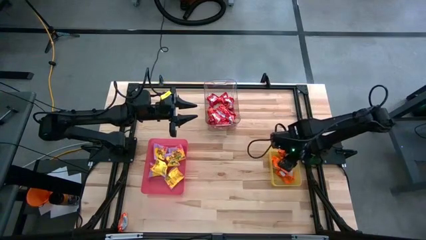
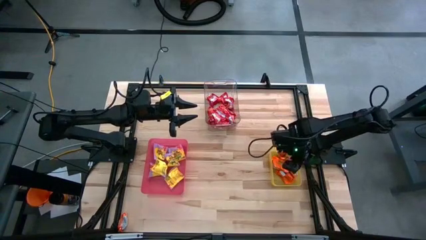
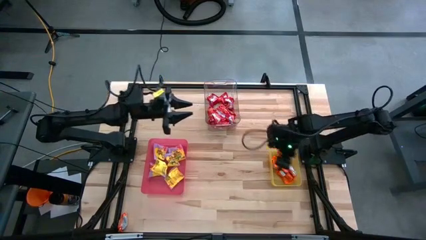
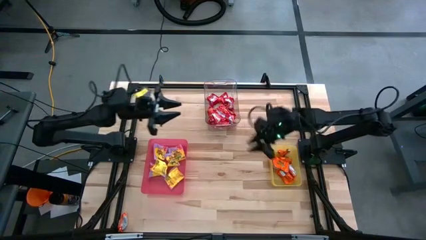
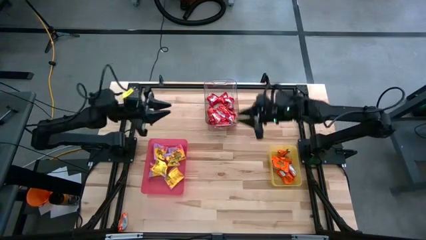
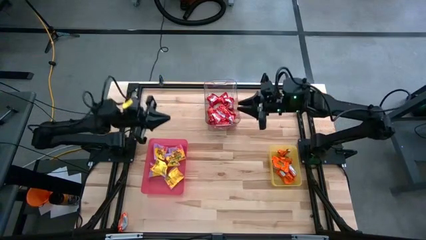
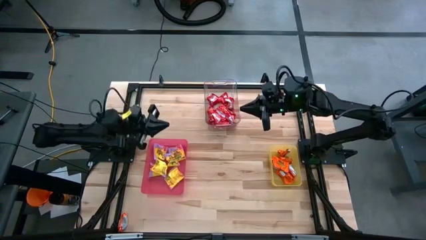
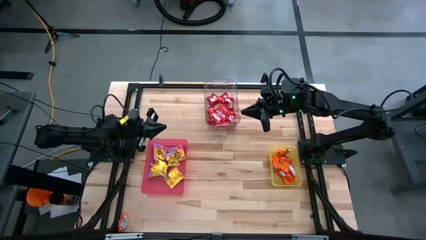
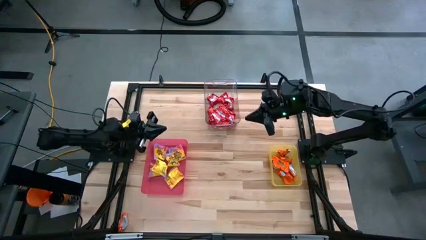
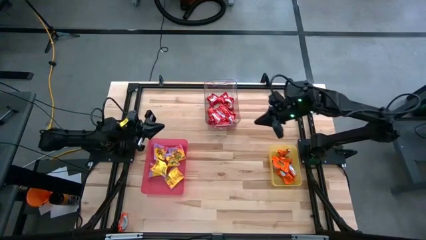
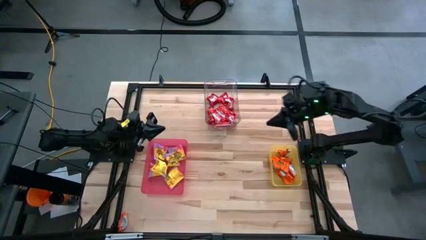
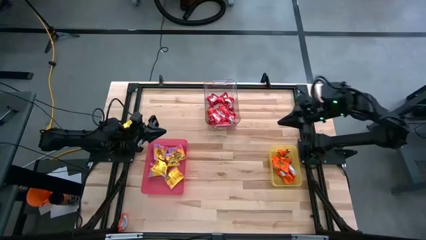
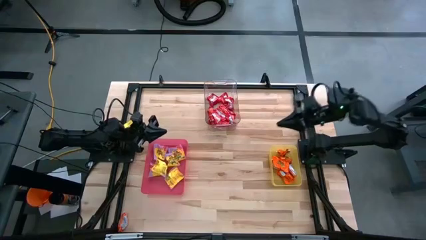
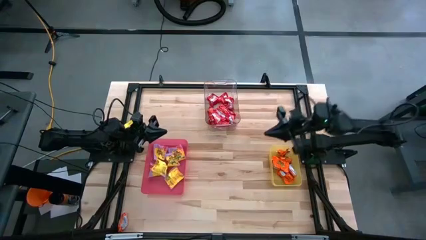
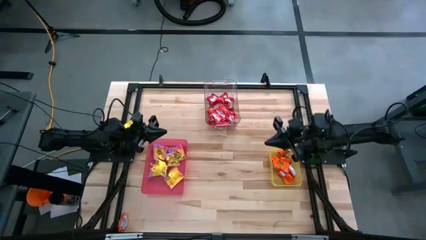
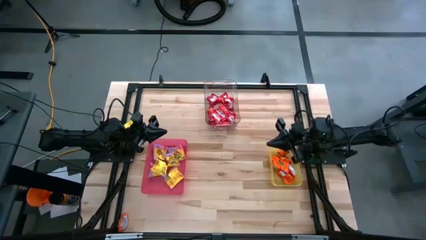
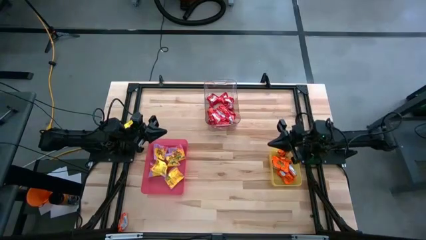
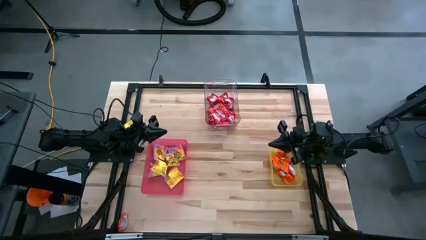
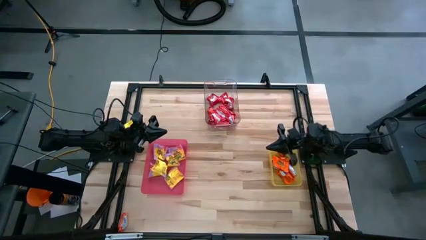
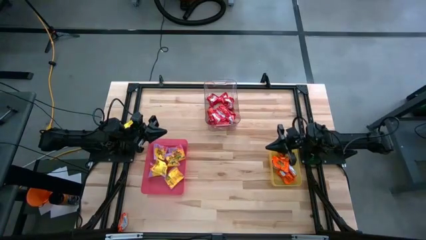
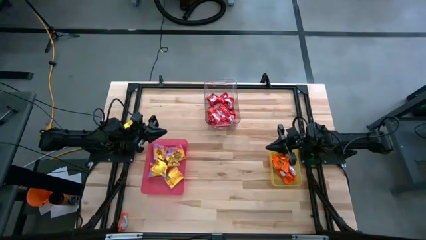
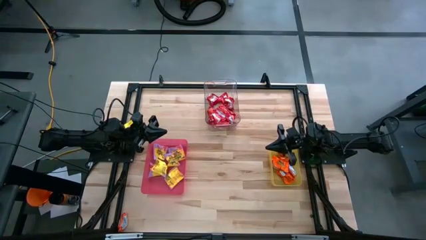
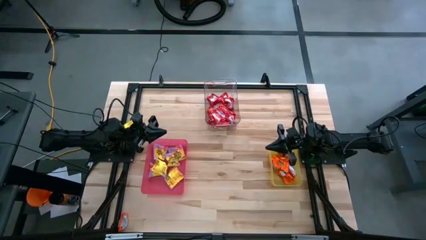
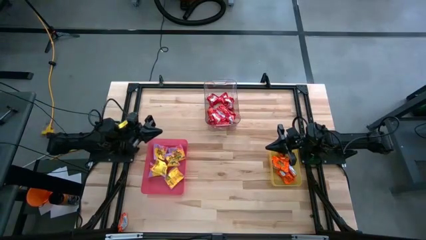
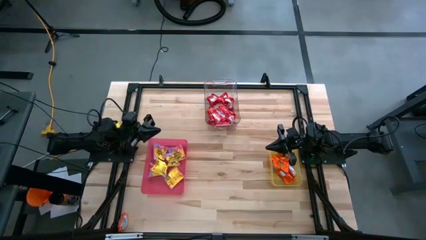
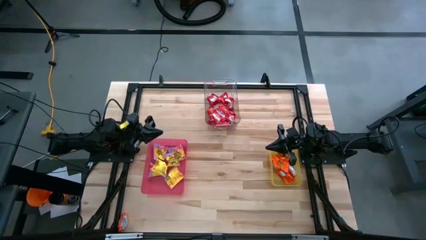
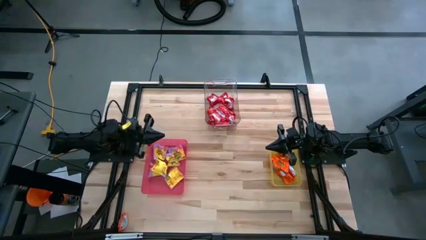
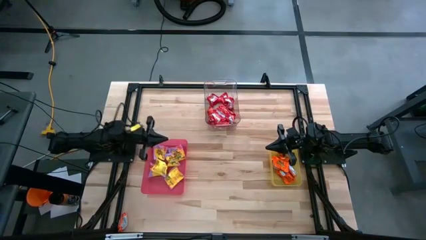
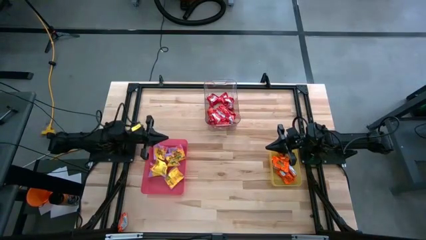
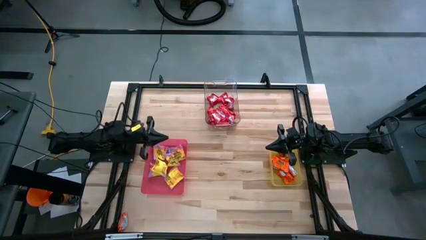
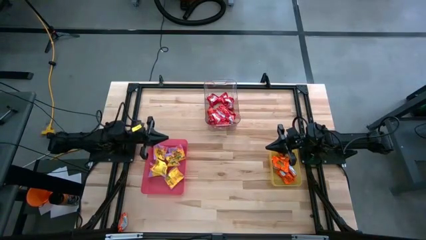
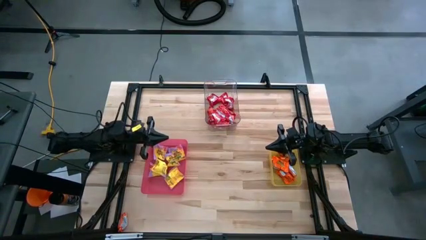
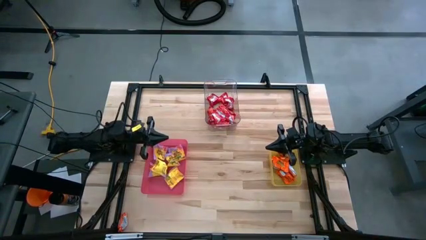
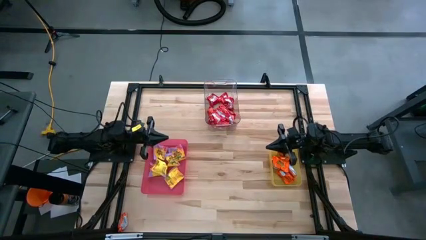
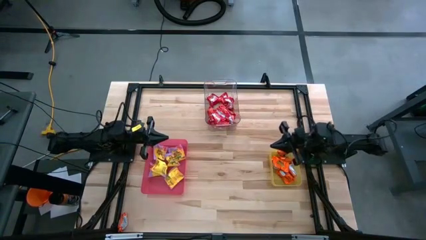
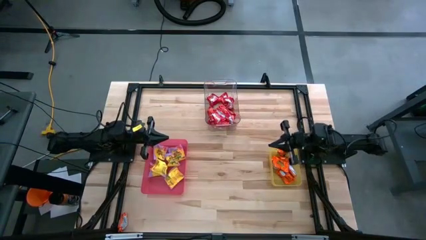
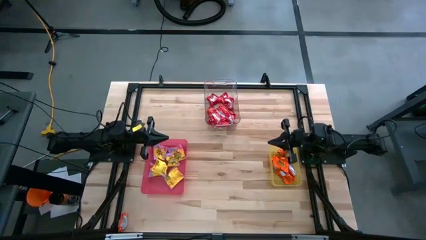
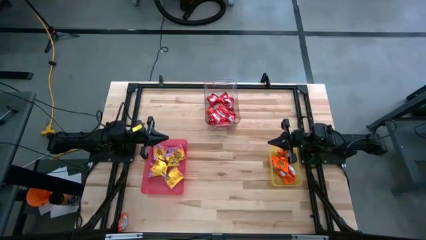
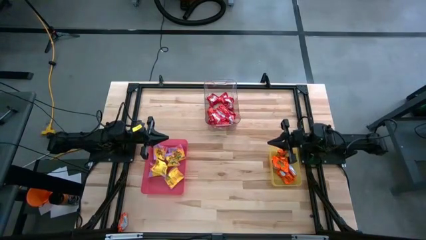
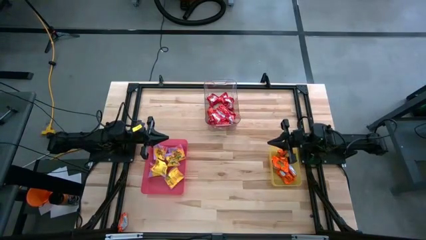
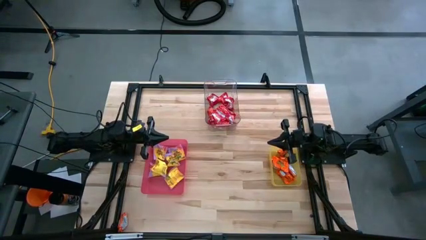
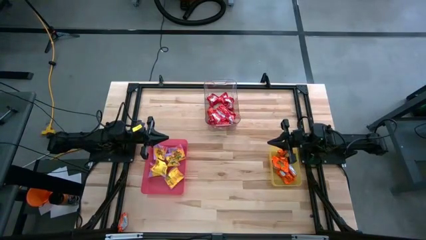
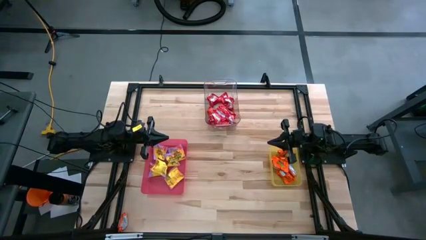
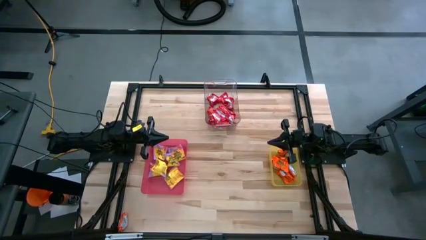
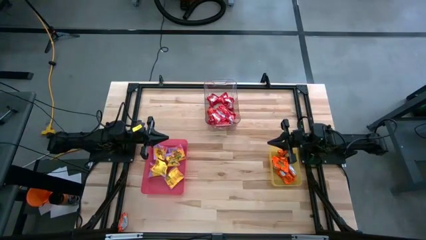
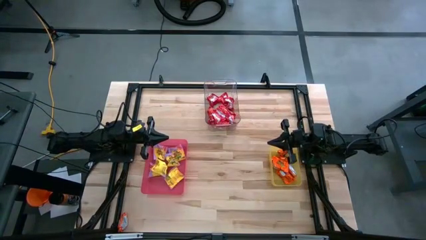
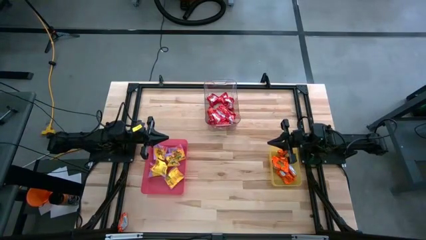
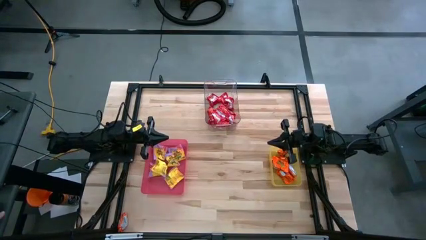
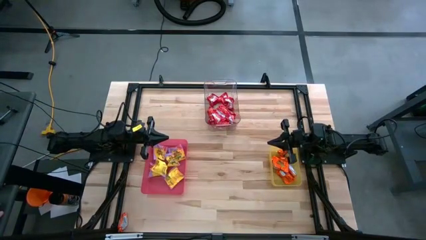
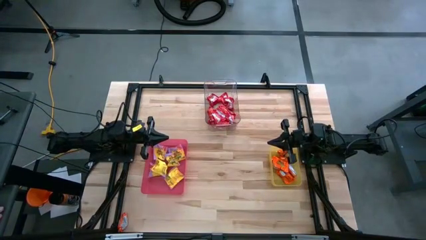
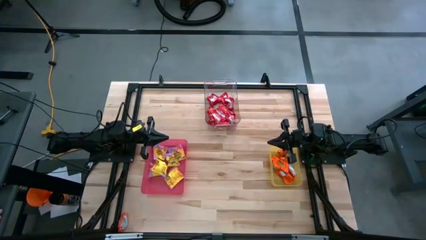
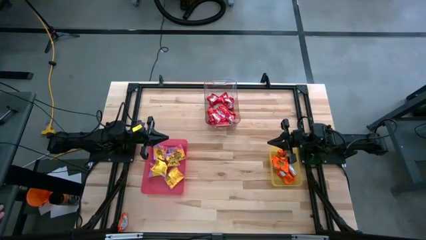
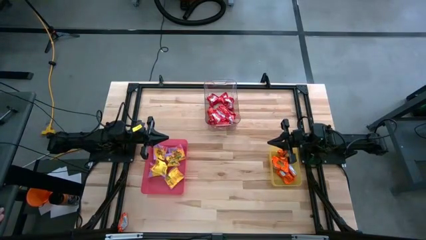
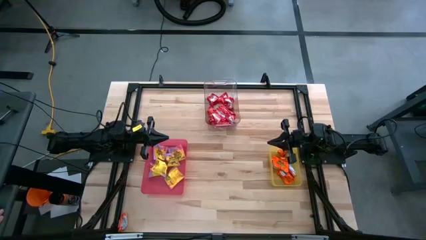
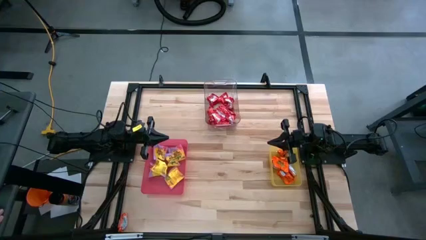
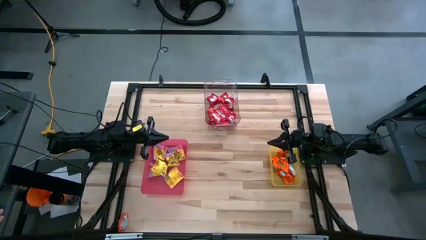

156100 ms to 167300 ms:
Task: Sort candy
Return to Home Position
